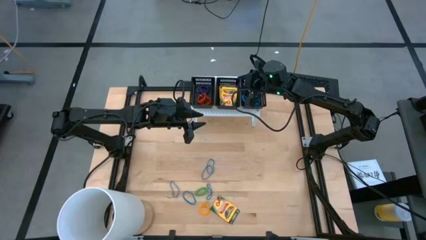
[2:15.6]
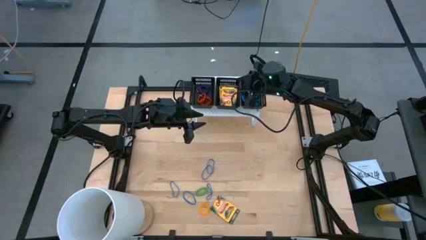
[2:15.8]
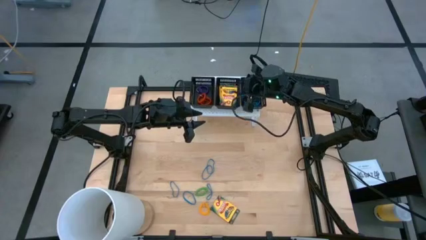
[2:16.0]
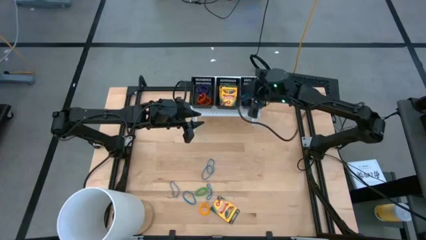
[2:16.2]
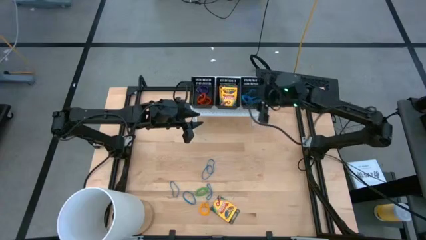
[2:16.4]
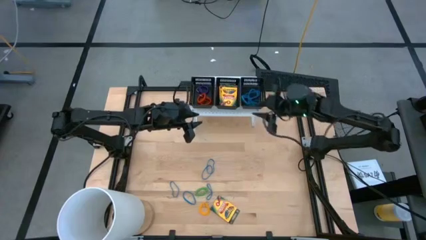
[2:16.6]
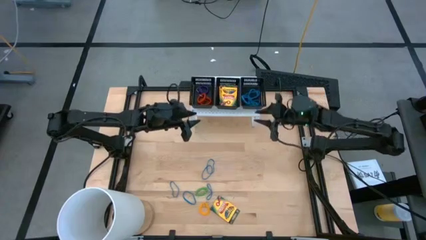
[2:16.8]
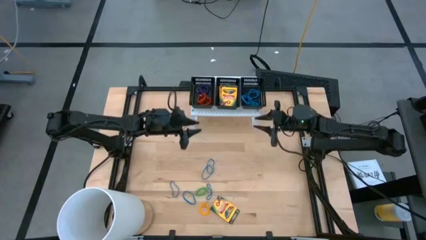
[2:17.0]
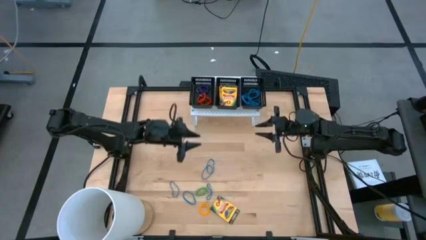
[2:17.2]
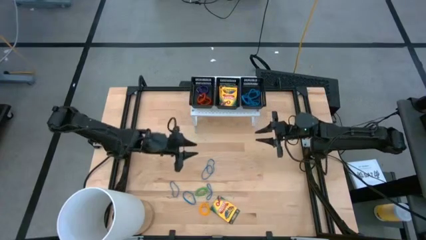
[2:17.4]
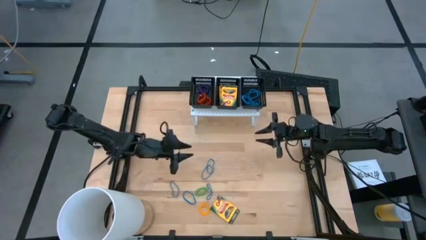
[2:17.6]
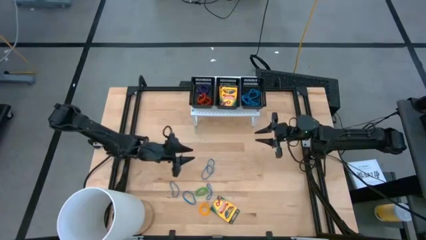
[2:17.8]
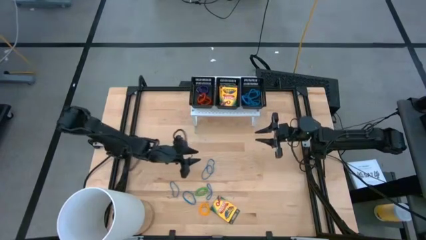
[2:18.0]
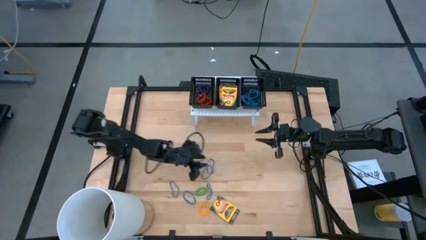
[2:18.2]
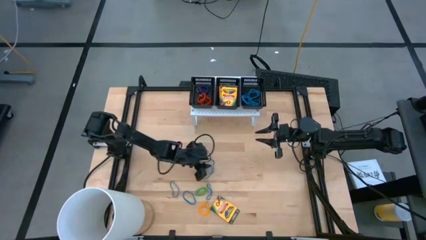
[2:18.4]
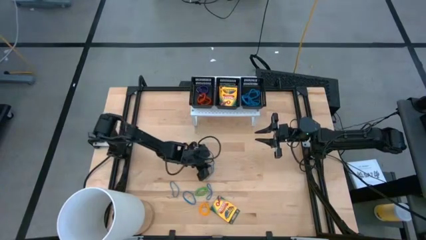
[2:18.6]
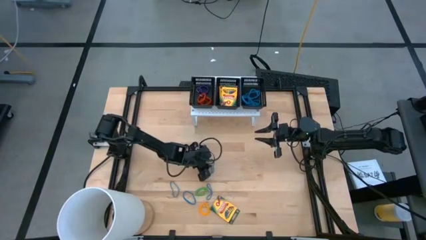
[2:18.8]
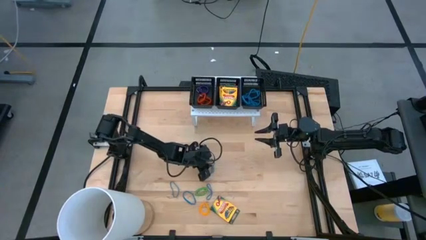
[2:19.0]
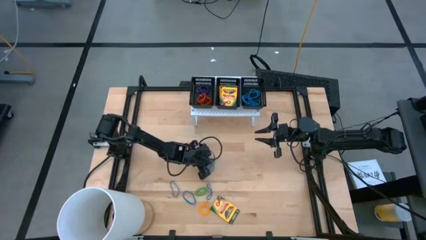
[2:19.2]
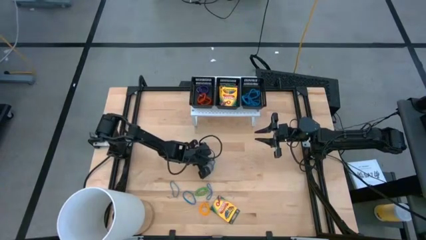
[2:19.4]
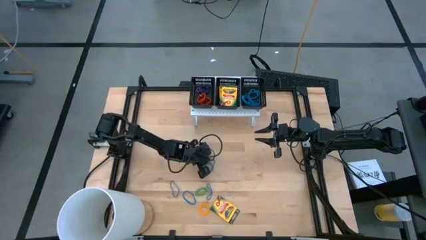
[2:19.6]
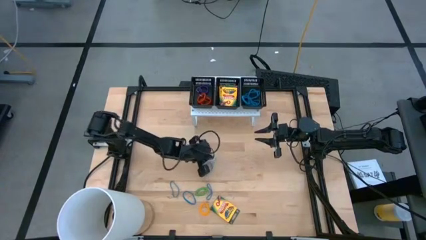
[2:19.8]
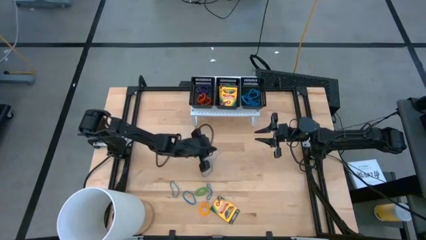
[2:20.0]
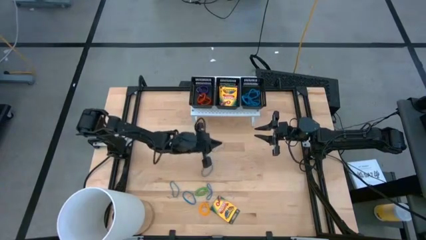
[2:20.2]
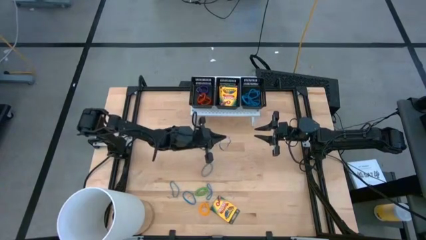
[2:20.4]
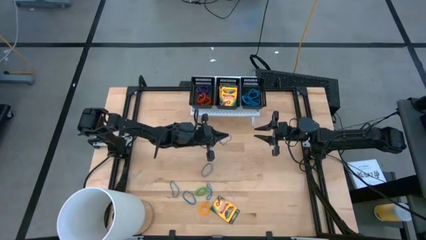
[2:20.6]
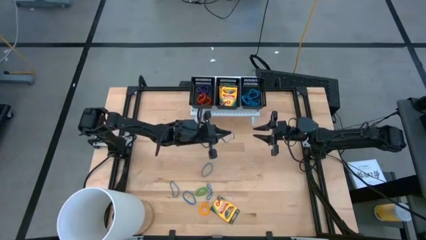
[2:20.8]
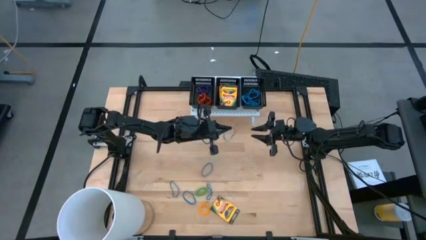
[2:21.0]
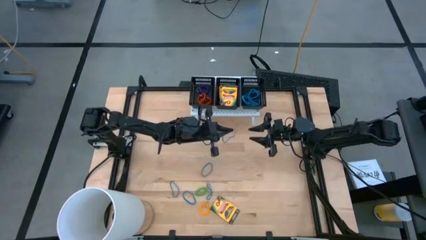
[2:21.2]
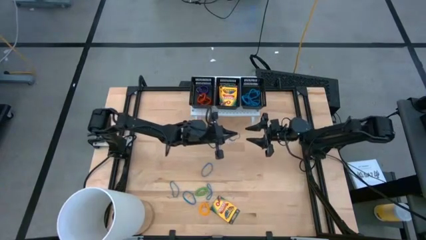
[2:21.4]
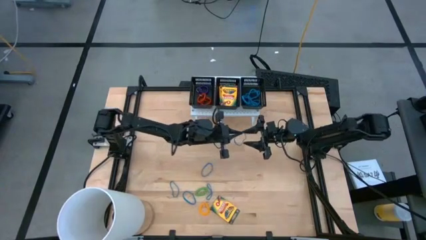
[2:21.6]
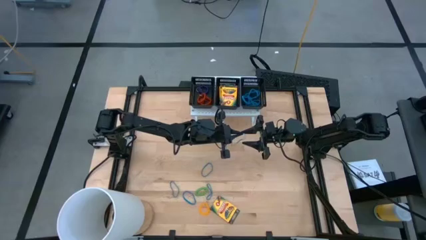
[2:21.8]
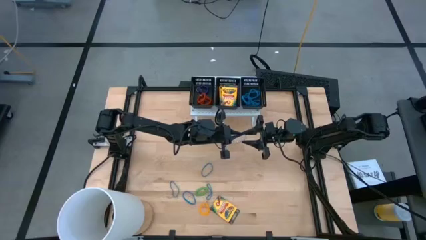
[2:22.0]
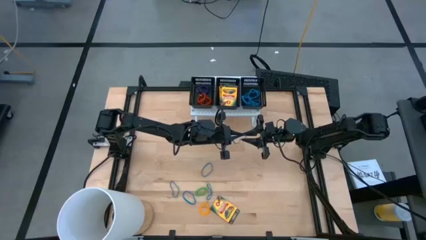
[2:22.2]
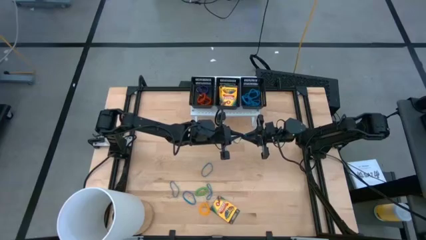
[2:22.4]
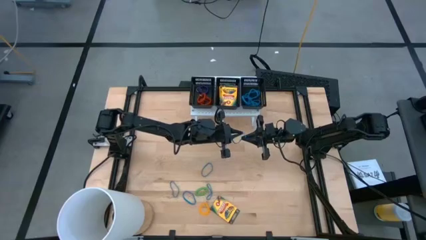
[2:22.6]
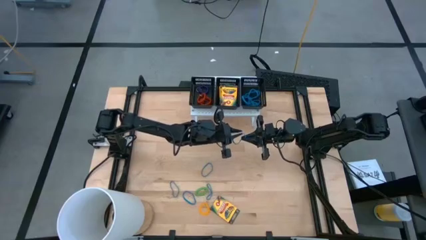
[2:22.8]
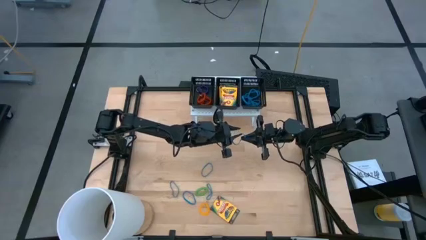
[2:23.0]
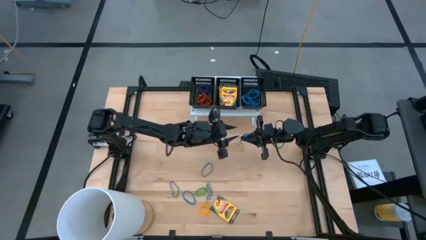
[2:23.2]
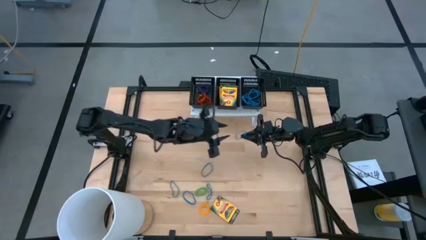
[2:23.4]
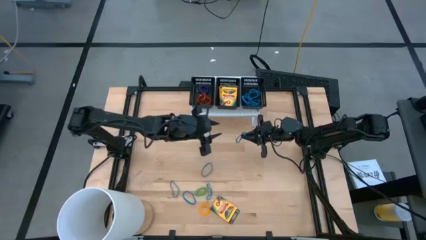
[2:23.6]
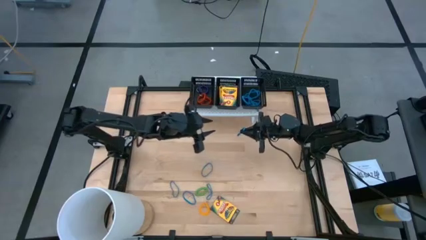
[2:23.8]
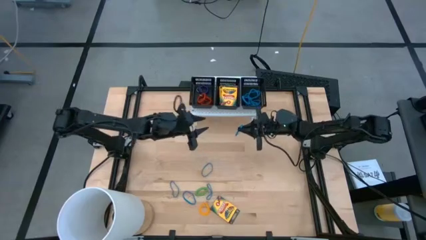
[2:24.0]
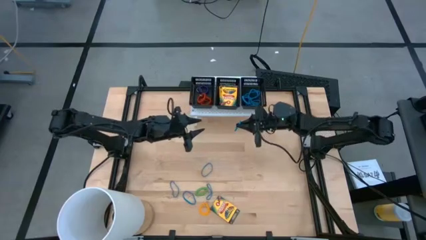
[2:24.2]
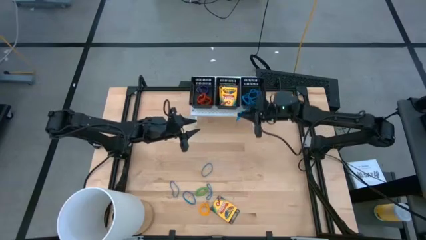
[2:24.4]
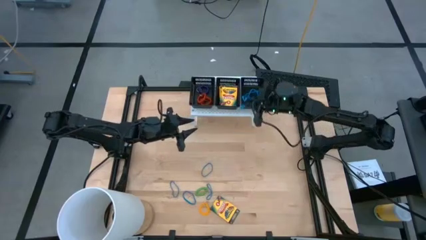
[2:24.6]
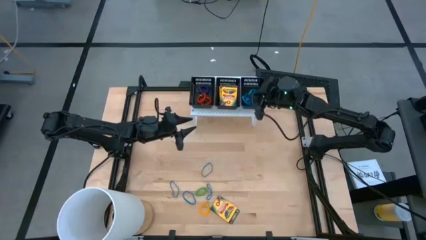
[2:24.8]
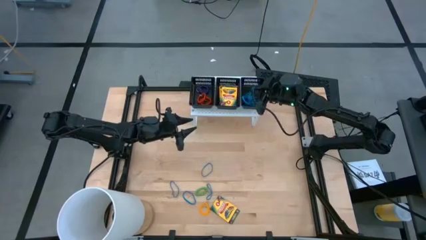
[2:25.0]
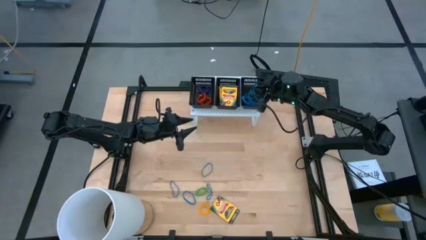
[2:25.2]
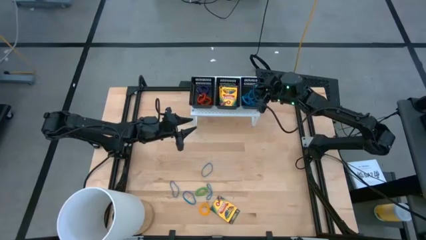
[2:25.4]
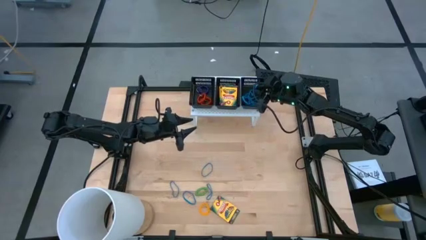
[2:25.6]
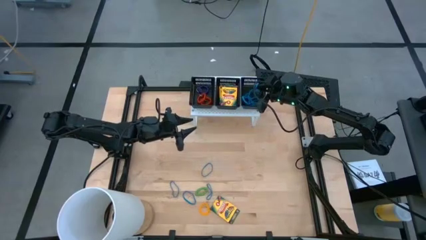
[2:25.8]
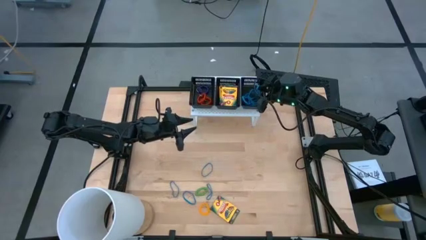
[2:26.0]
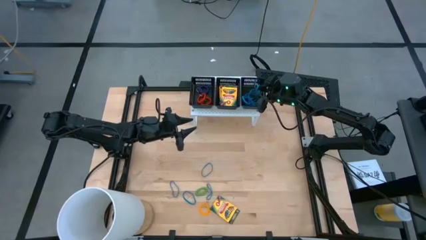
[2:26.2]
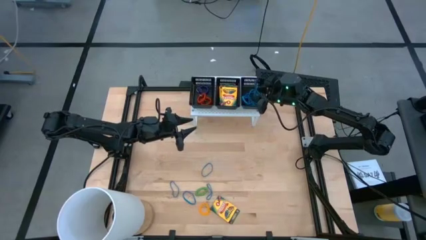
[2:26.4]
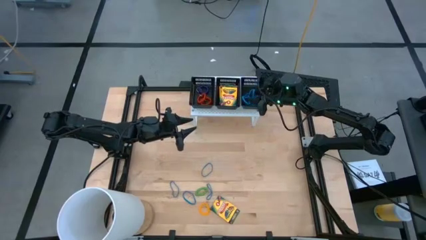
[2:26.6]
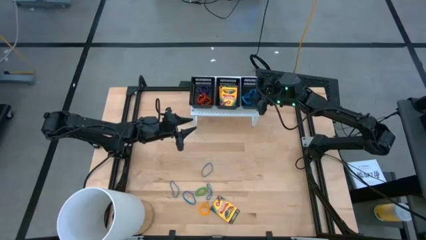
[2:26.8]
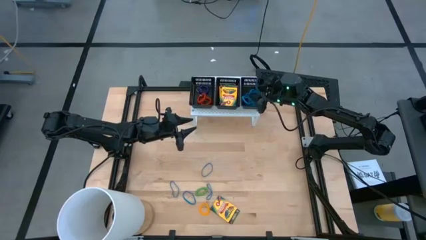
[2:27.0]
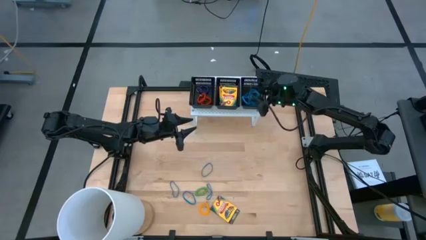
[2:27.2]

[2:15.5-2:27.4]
Task: Pick & Place Office Desk Supplies
Put the blue rubber band into the right black bin on the shelf

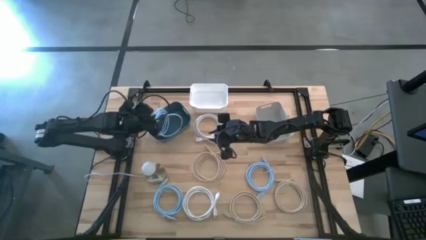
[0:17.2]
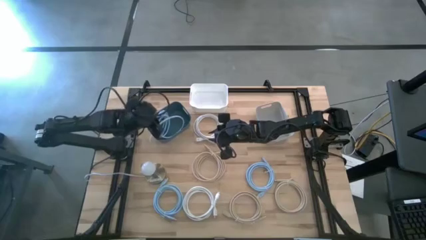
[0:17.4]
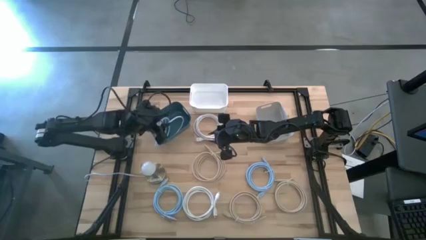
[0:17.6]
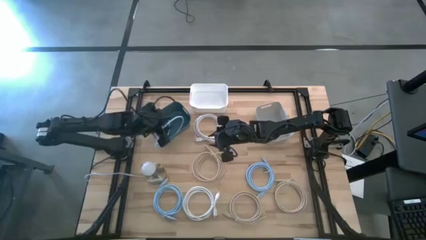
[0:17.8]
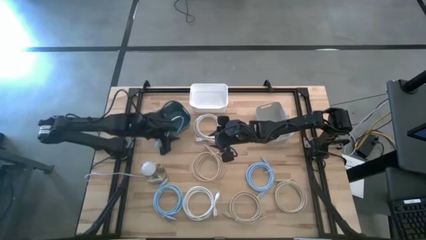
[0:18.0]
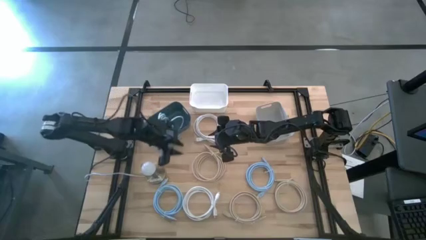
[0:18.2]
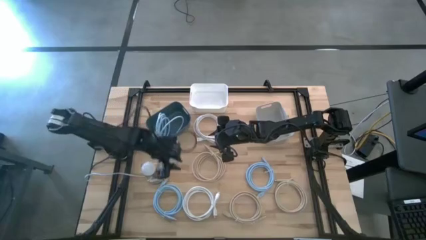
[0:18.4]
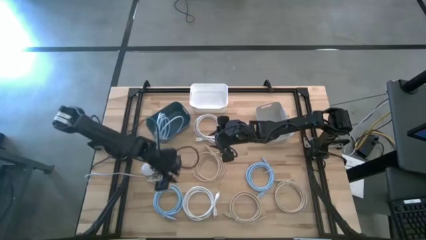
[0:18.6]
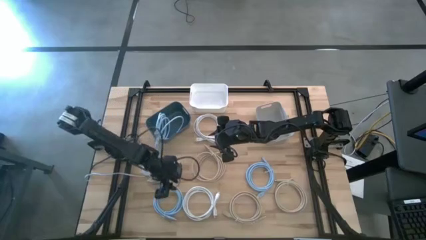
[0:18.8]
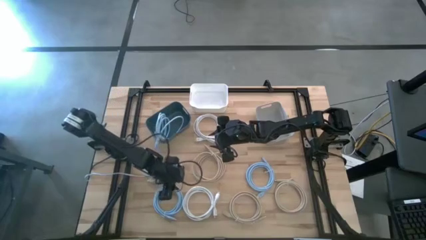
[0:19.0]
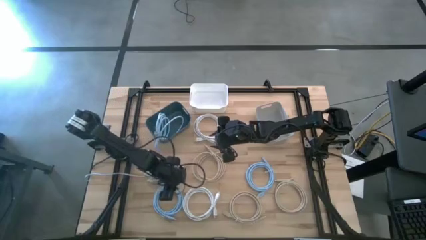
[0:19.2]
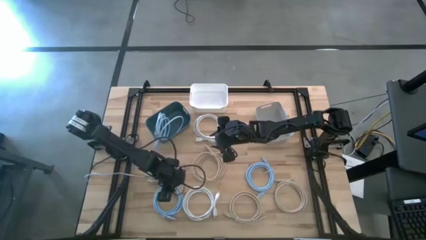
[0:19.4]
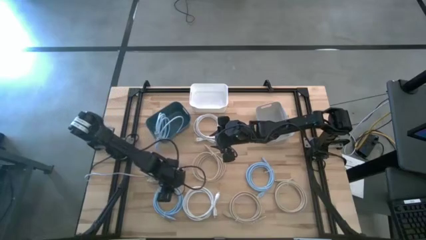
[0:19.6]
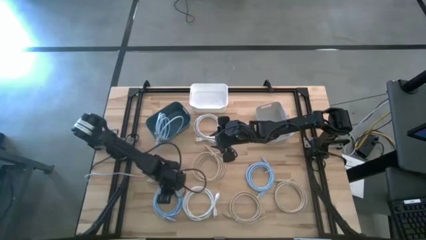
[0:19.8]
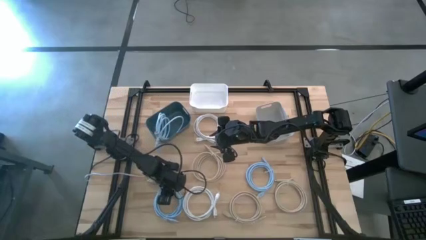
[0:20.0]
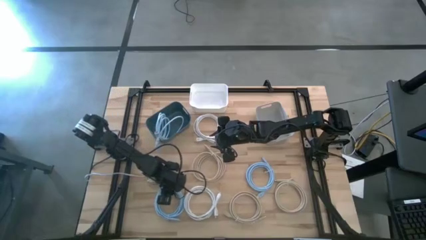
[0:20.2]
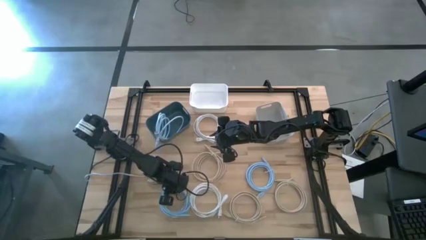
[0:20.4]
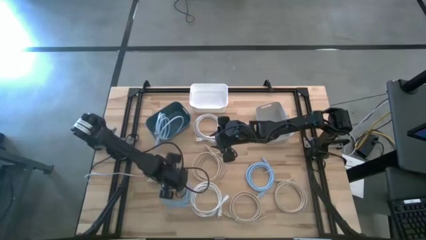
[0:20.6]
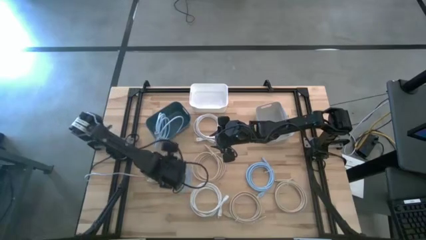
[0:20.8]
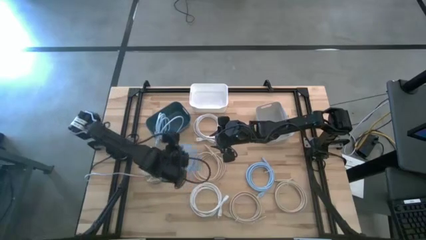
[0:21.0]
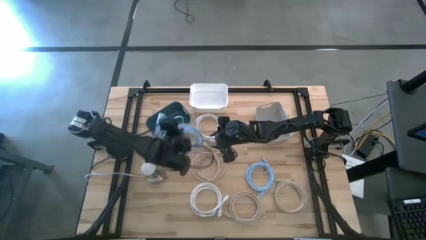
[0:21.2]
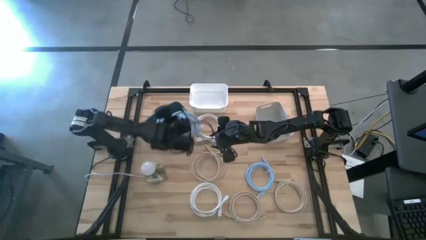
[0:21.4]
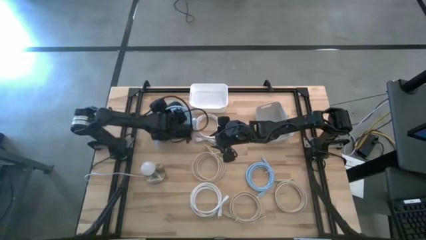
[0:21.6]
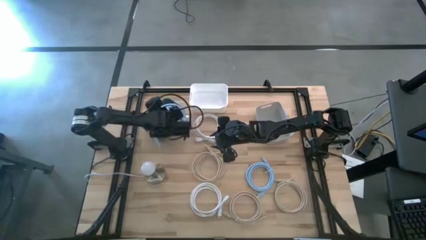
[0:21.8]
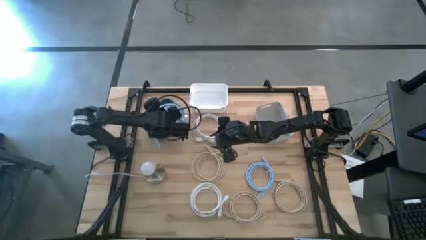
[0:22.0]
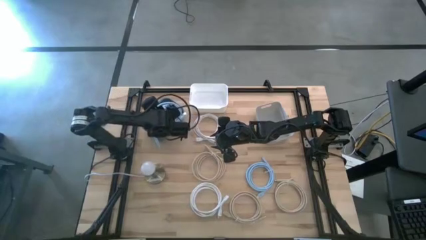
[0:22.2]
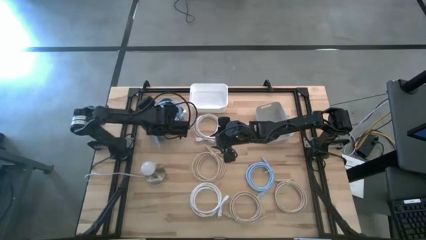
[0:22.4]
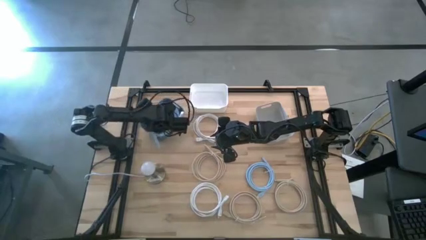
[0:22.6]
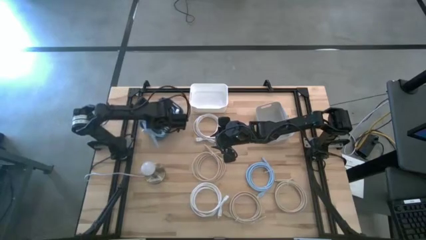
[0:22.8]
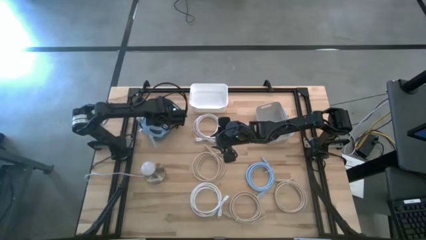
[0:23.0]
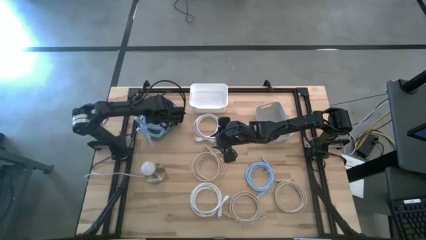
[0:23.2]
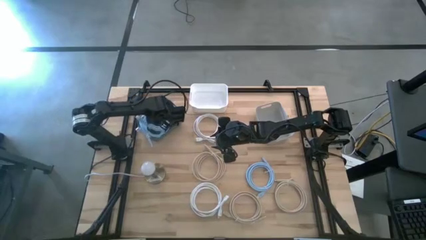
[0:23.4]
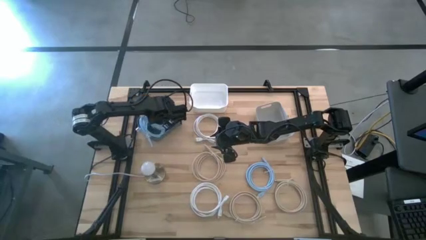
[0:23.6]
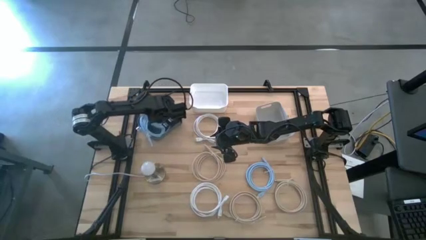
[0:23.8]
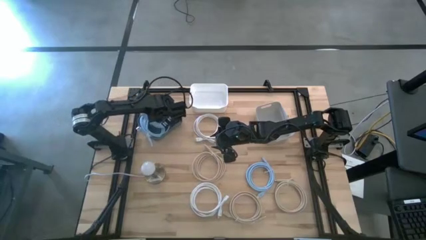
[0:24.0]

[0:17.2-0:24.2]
Task: Sort HDMI cables
Put the bottom blue hdmi cable into the blue bin
